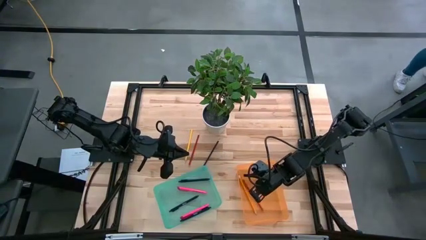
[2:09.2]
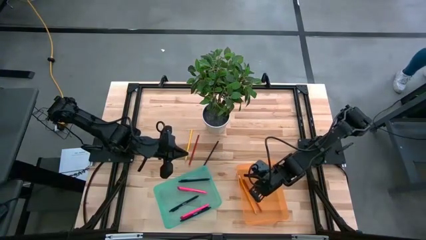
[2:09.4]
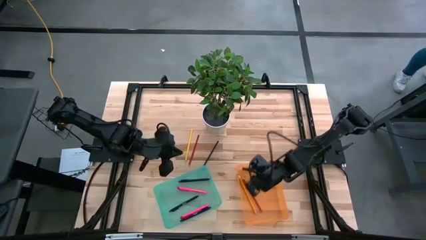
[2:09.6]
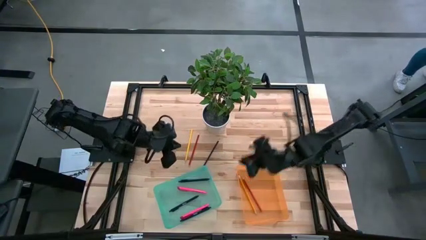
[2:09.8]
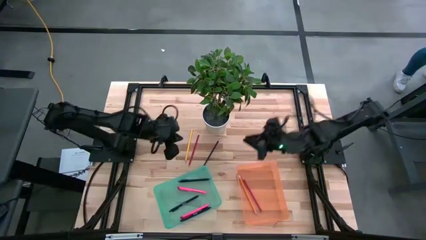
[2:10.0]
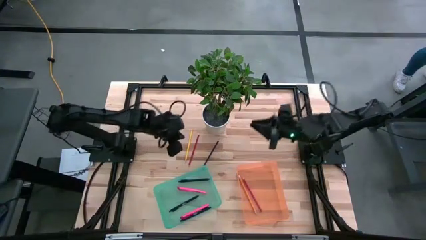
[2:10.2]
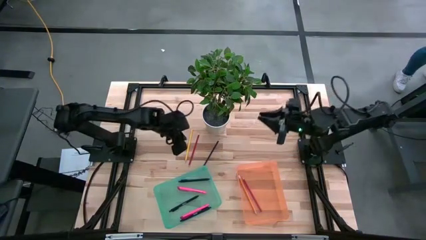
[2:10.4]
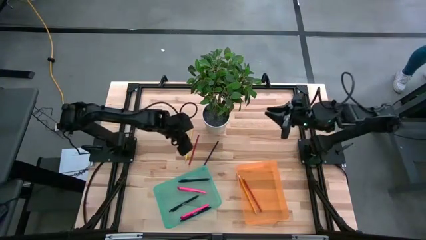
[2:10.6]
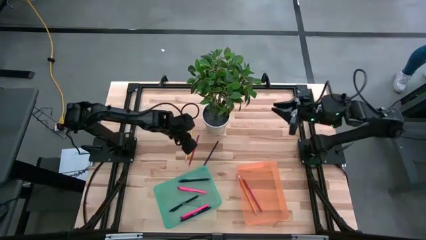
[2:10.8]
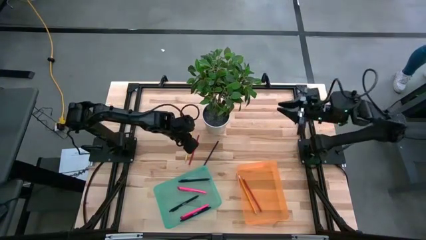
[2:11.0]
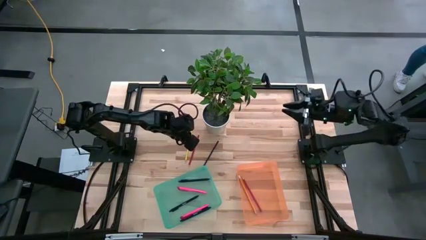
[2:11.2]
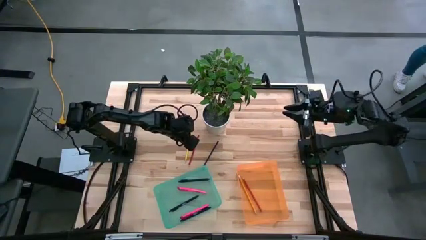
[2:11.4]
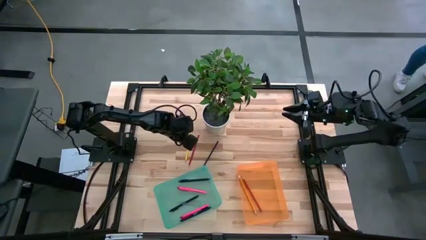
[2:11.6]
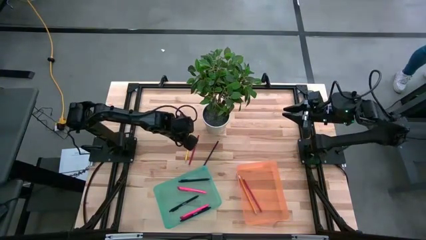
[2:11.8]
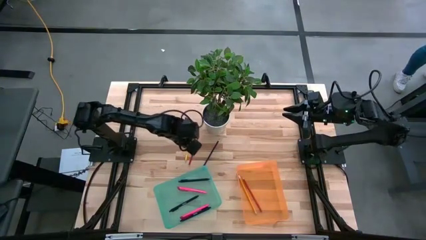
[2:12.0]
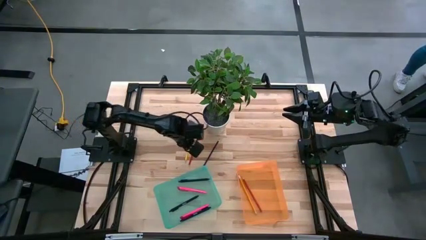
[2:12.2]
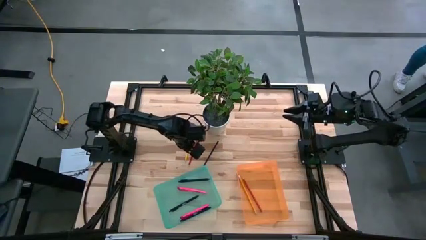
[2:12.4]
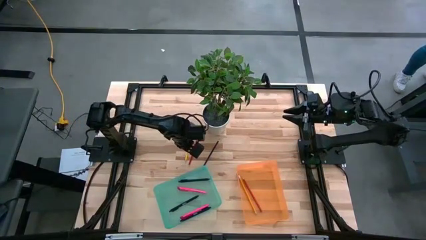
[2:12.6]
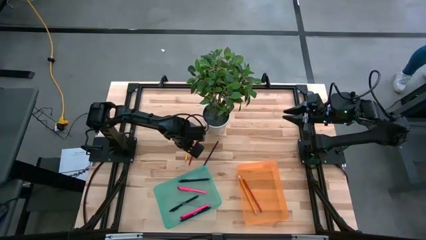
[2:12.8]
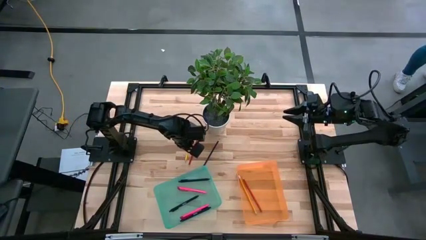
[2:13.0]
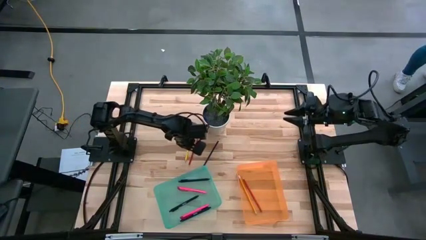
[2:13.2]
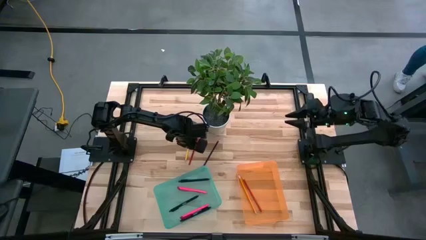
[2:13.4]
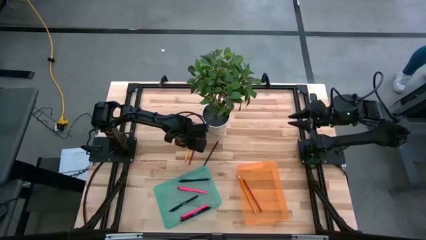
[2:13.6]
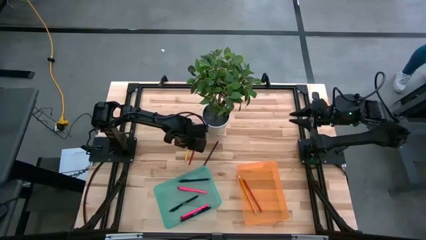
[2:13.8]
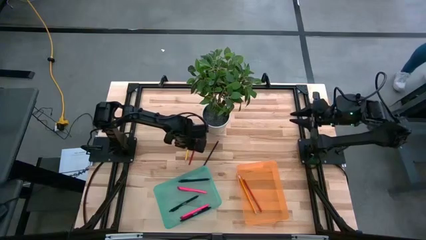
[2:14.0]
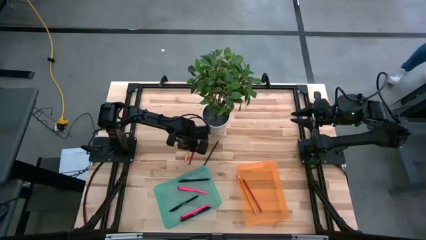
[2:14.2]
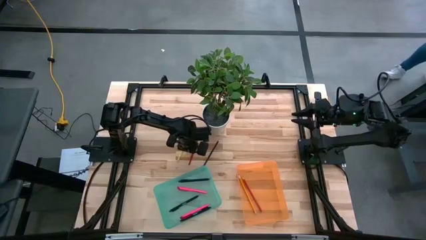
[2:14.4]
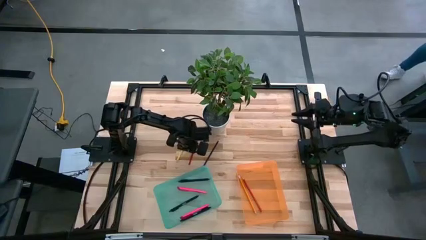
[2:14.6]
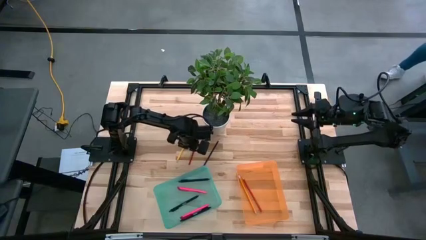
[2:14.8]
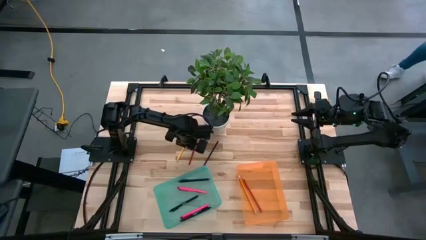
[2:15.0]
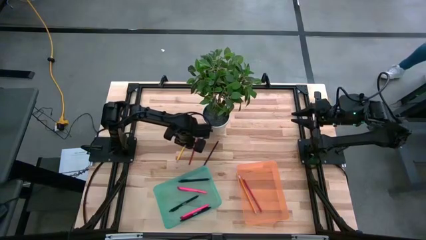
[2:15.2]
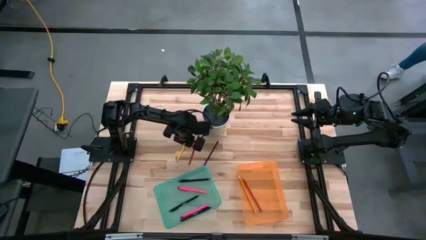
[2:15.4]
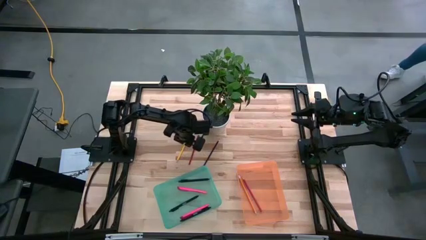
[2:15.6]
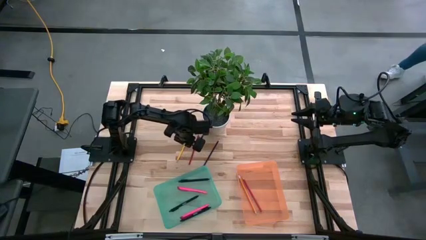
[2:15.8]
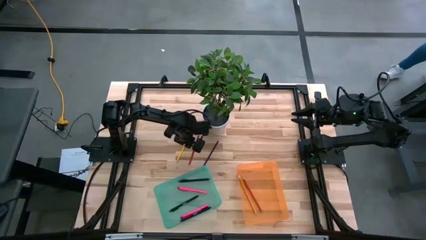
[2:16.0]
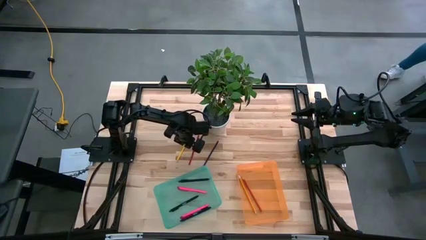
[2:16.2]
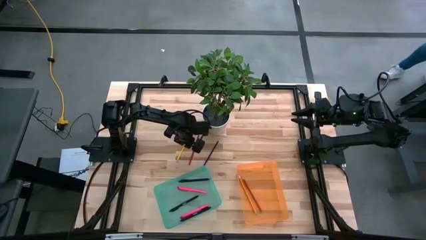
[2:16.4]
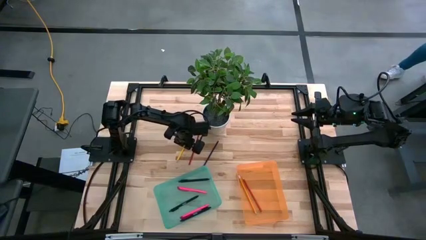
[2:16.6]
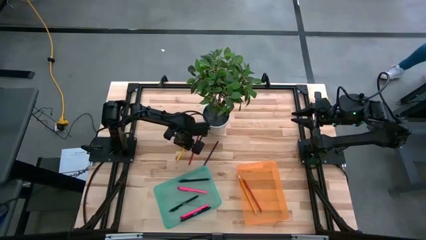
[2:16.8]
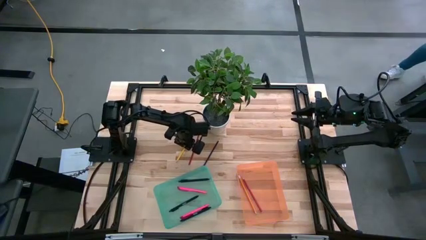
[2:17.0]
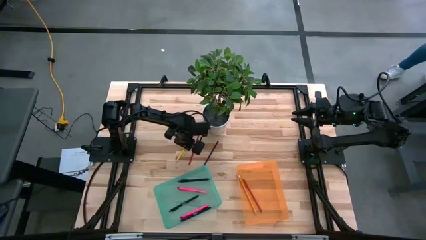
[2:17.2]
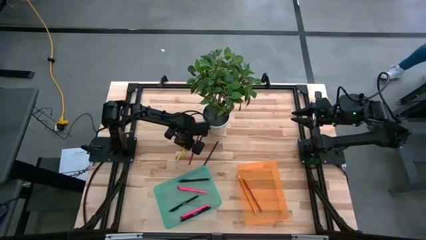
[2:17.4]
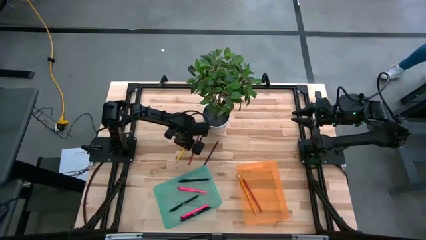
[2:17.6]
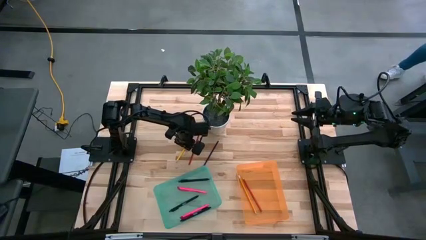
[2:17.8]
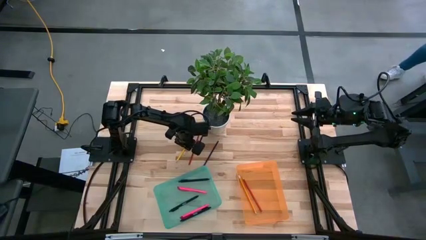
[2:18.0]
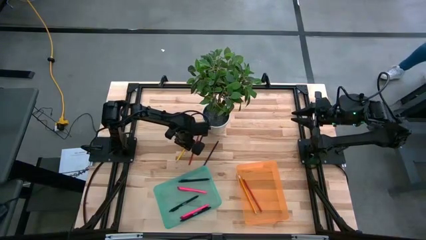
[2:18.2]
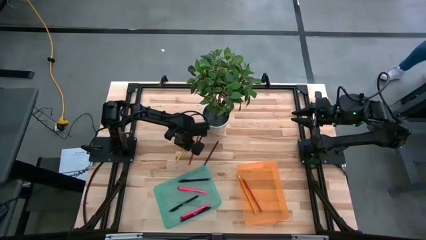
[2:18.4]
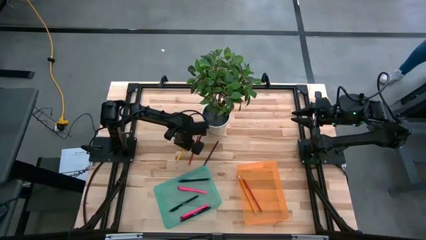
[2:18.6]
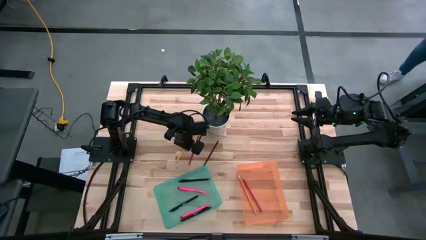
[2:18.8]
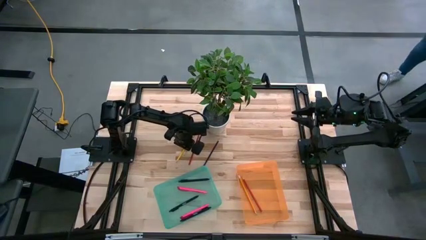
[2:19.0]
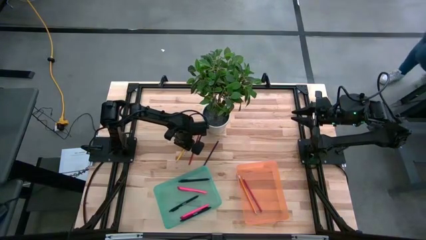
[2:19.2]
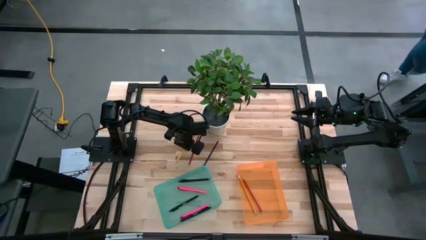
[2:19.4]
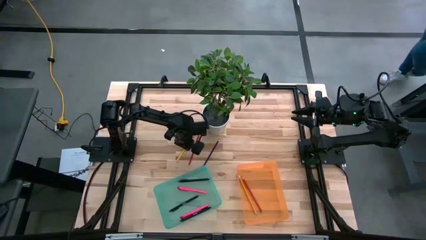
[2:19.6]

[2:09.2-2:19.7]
Task: Sort pens & pencils
Put the yellow pencil into the orange bin
